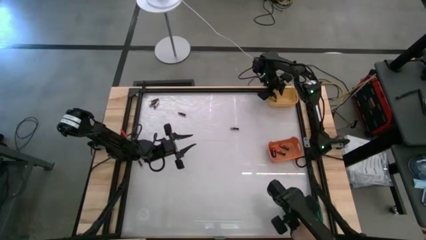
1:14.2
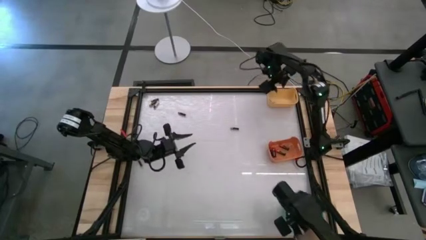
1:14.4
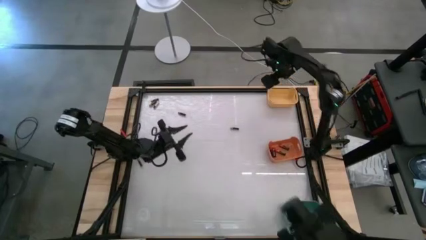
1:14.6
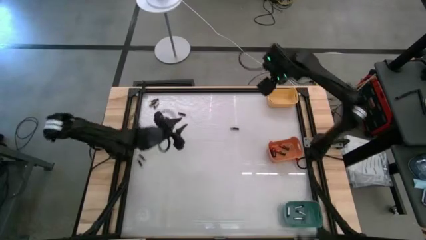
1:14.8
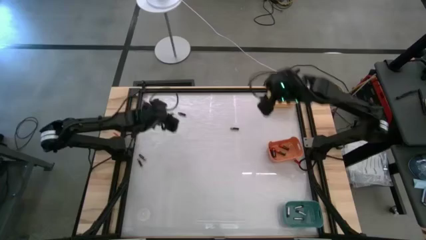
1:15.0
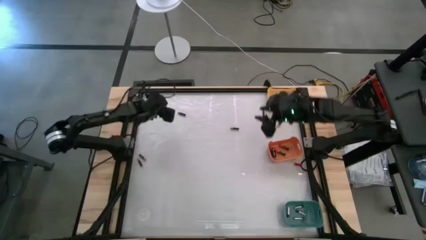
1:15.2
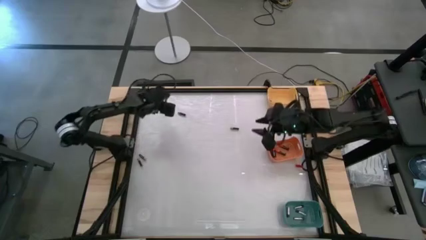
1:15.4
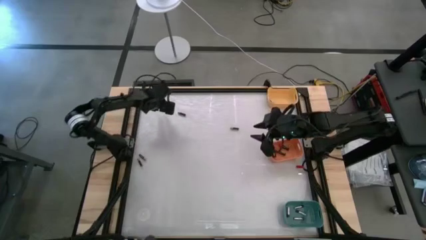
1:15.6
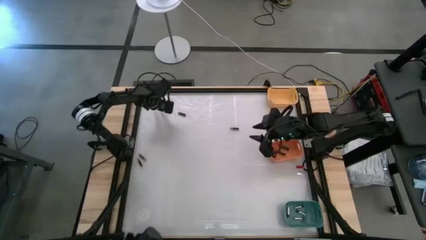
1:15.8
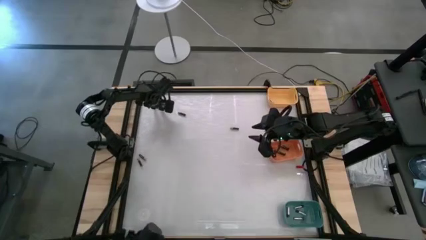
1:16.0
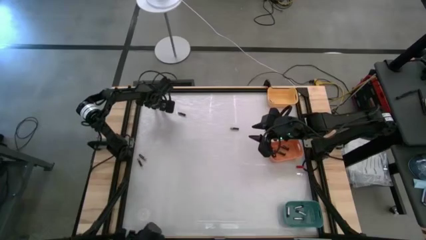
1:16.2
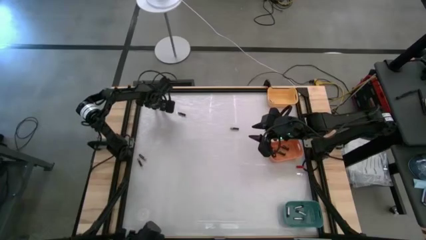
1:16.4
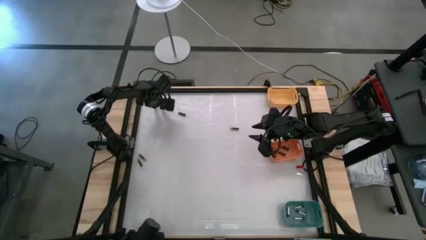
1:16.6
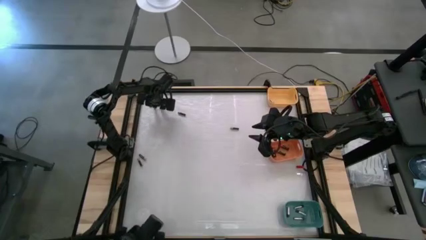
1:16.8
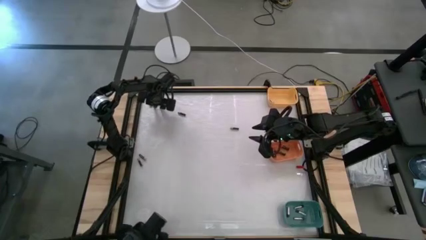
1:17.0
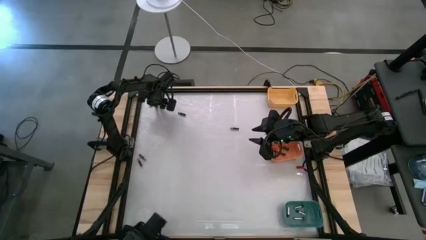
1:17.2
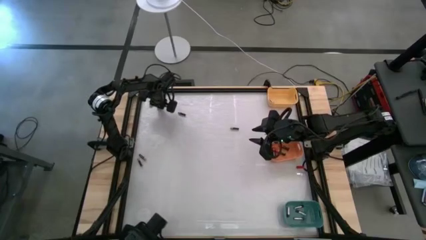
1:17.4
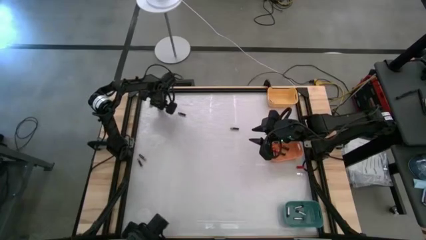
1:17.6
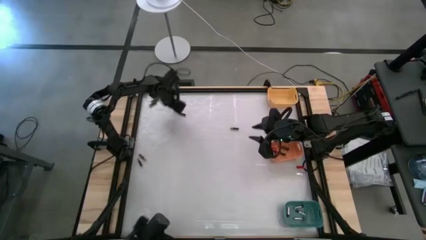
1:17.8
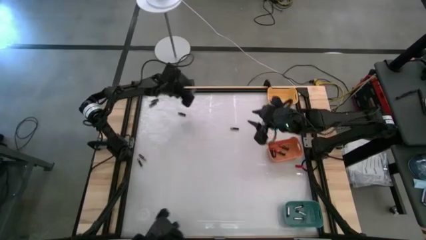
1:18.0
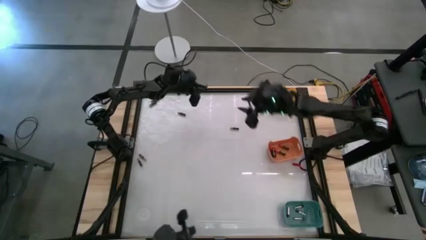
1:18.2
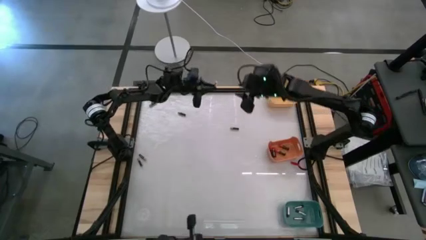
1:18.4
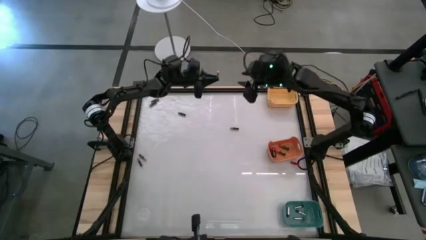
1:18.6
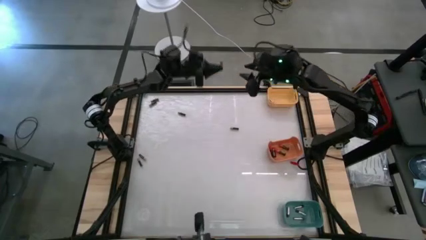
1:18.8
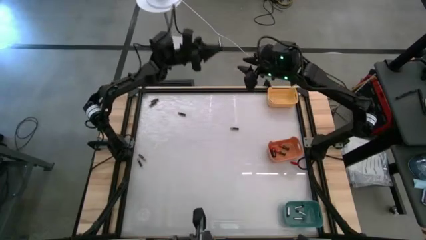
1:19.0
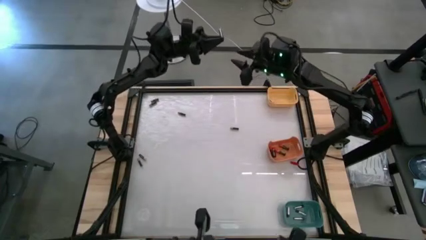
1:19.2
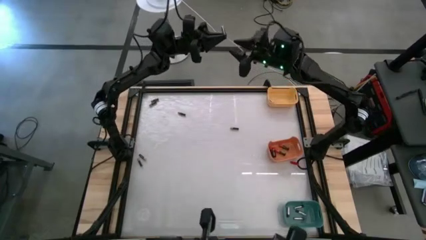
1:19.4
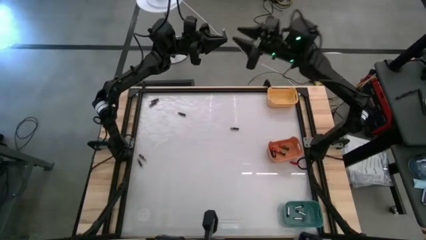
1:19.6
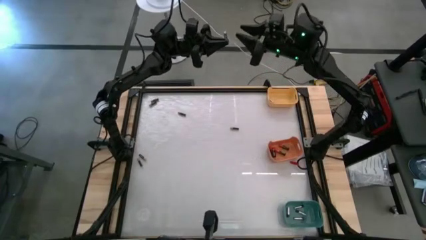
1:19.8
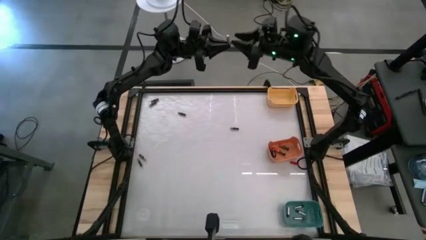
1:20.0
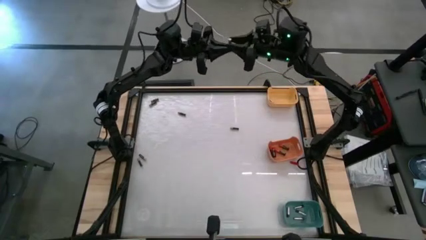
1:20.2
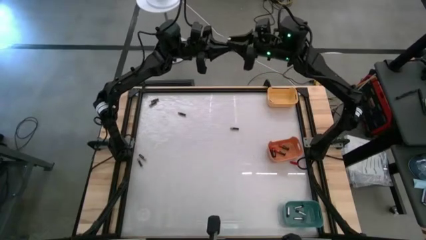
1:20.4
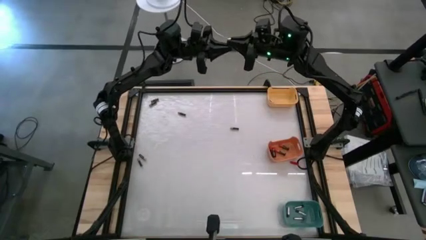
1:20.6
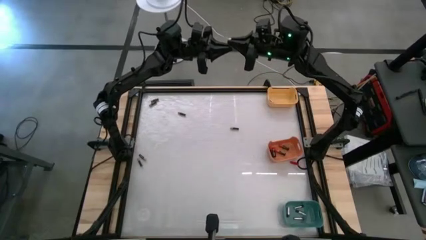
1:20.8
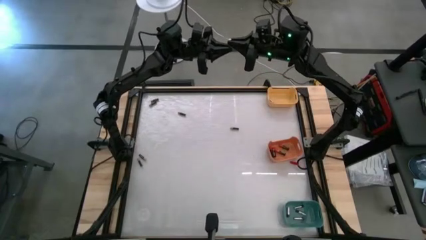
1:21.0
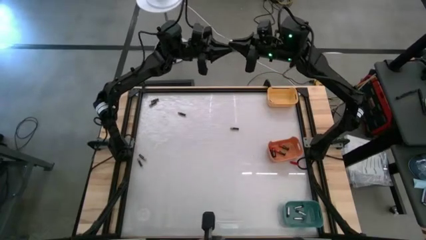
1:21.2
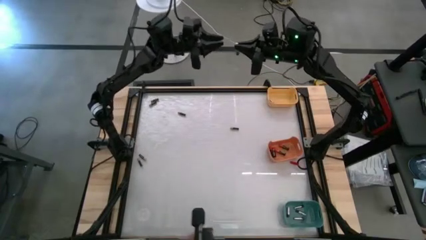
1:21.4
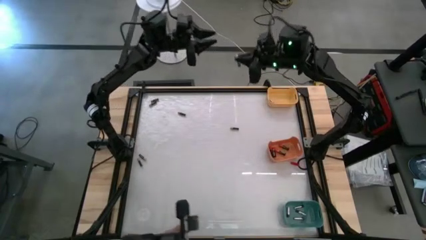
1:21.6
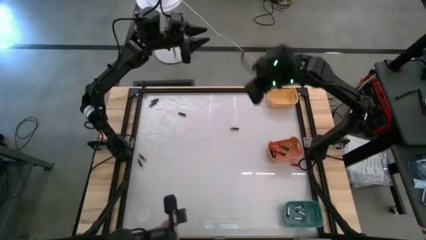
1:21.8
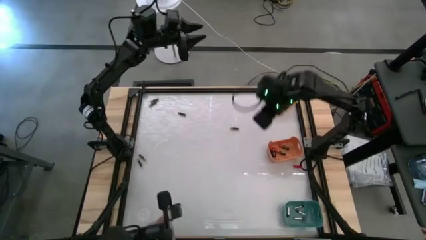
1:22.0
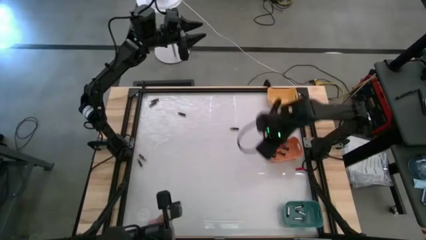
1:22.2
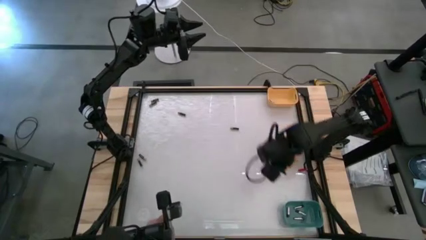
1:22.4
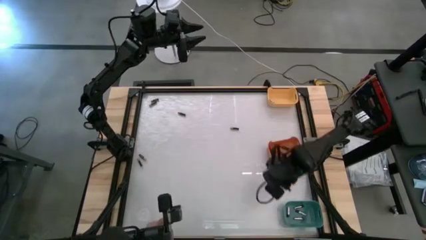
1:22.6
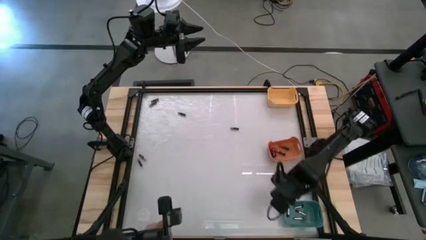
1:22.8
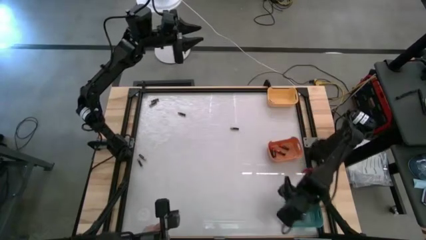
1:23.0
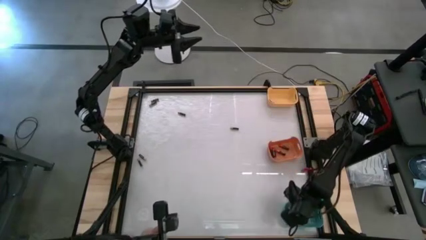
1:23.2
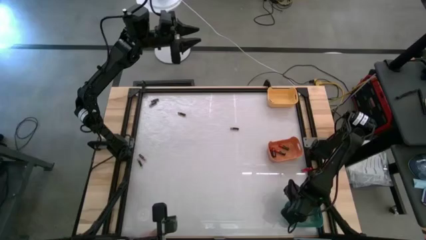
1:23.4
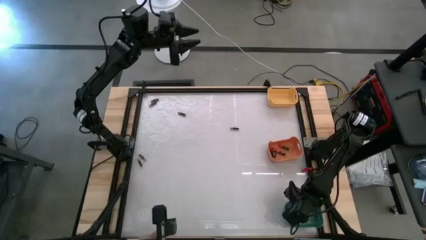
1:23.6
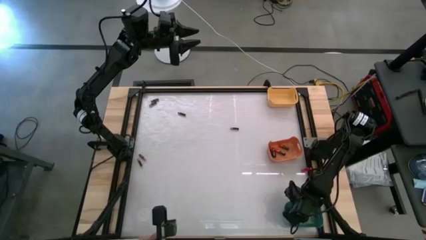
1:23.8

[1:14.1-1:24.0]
Task: Sort batteries
Put the silver battery into the green bin

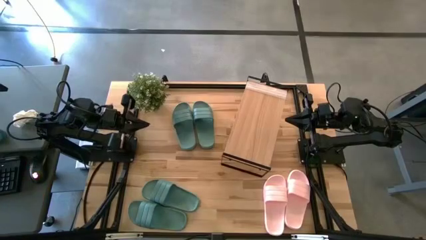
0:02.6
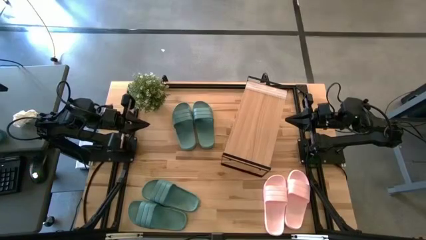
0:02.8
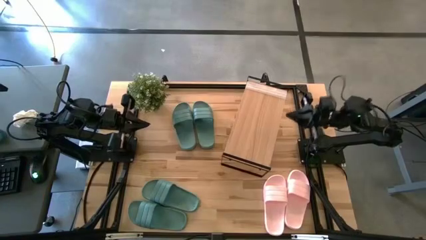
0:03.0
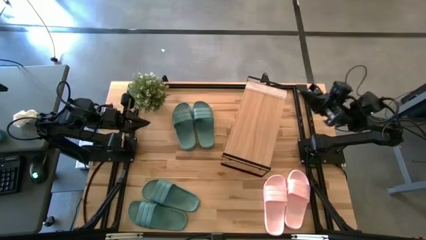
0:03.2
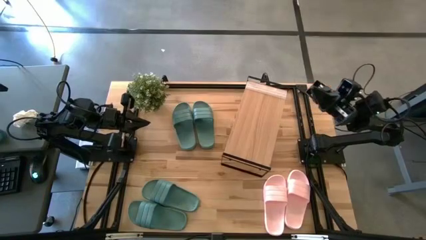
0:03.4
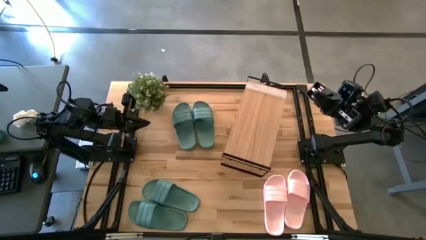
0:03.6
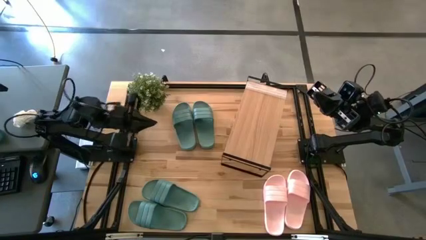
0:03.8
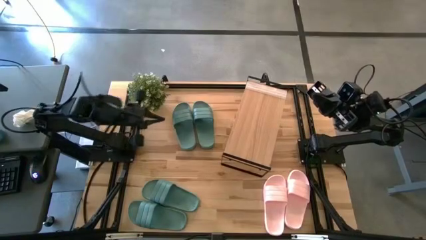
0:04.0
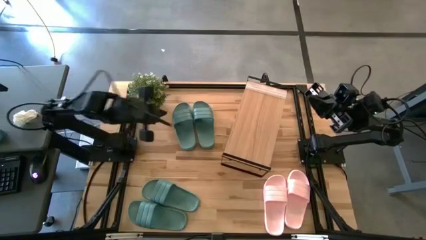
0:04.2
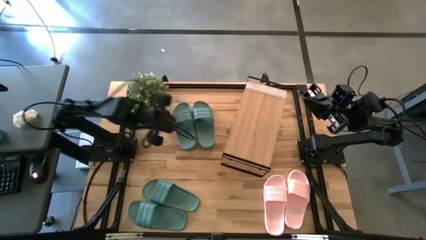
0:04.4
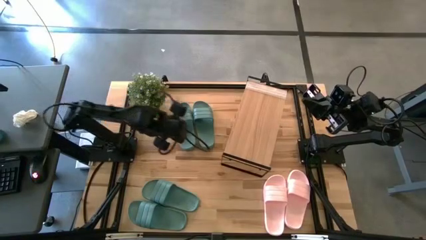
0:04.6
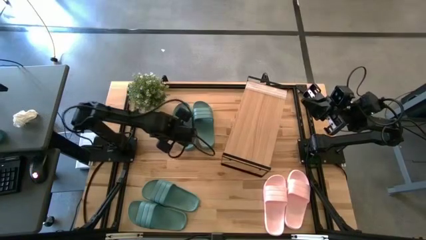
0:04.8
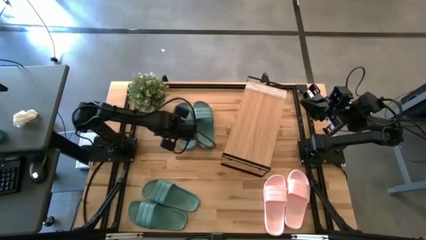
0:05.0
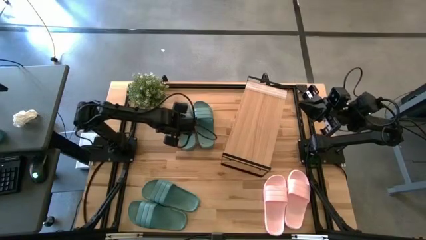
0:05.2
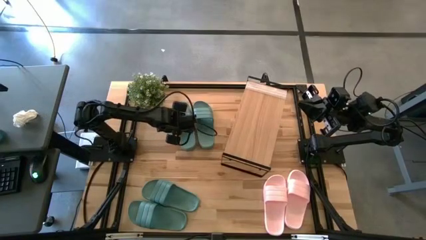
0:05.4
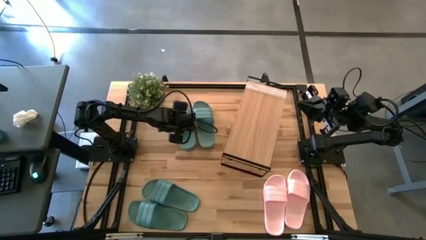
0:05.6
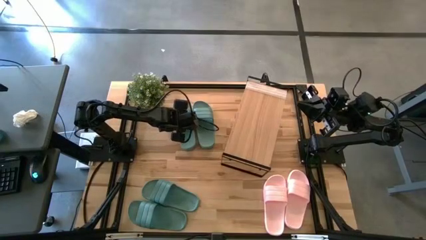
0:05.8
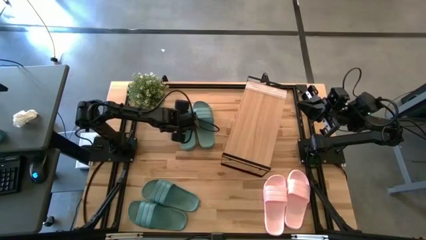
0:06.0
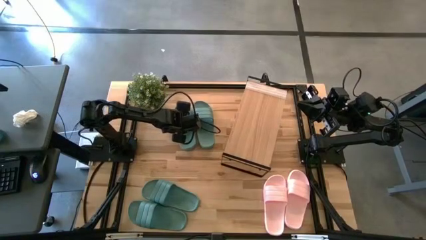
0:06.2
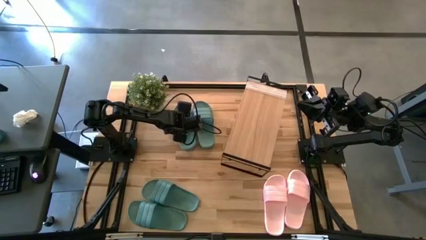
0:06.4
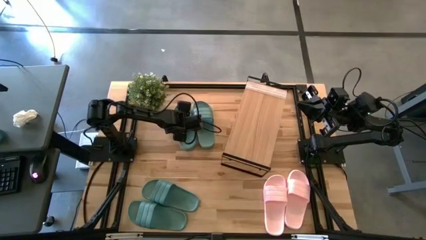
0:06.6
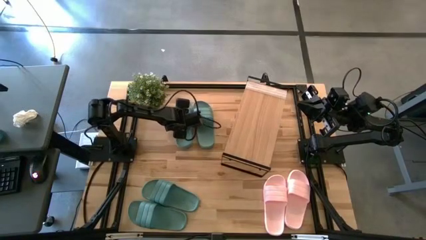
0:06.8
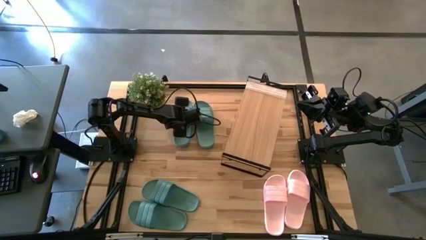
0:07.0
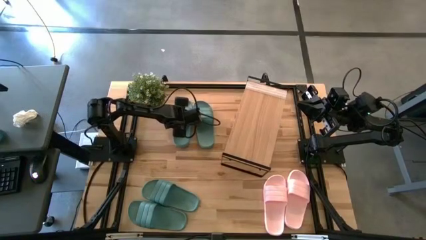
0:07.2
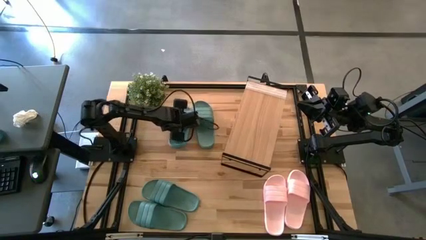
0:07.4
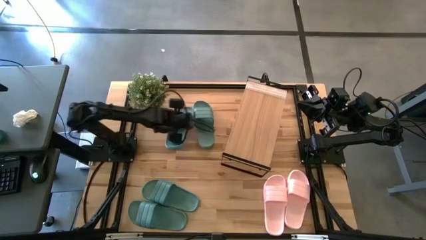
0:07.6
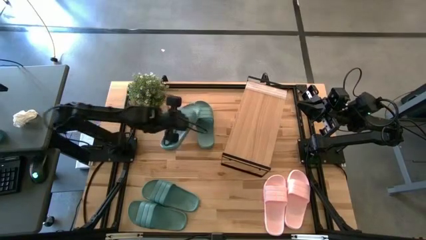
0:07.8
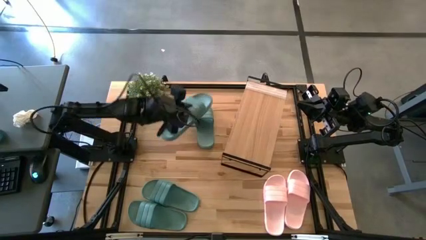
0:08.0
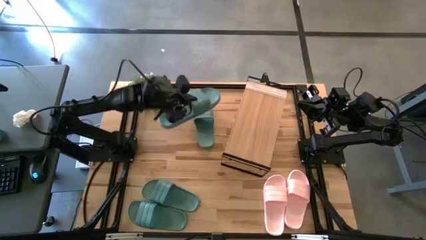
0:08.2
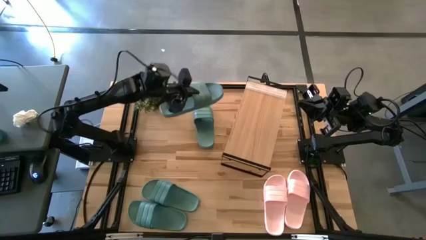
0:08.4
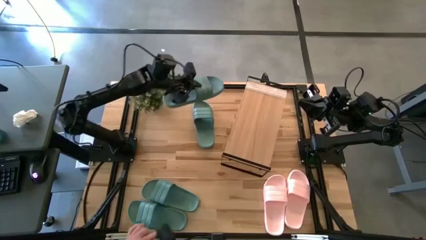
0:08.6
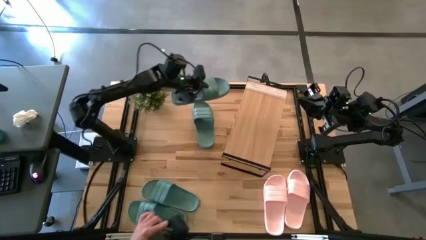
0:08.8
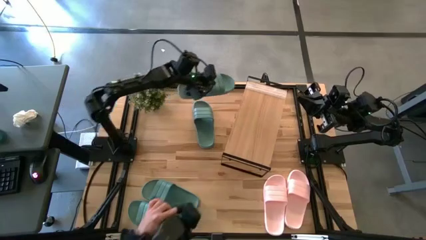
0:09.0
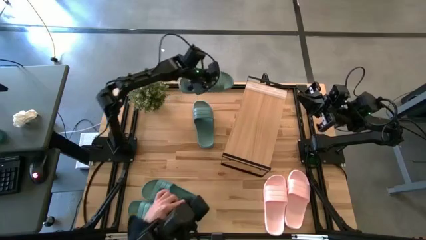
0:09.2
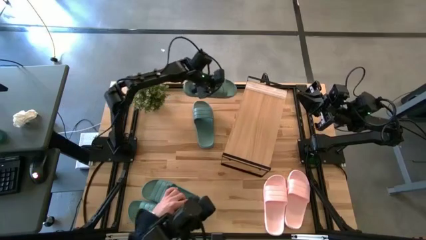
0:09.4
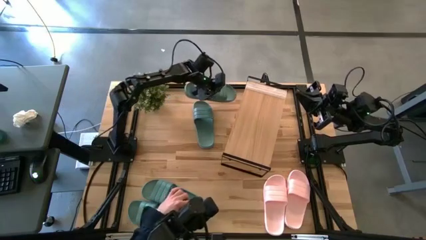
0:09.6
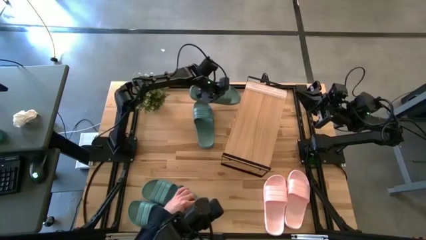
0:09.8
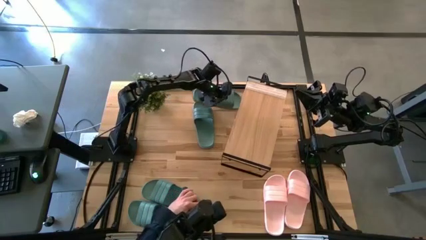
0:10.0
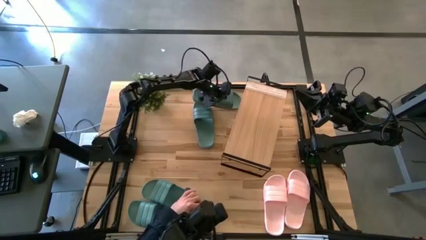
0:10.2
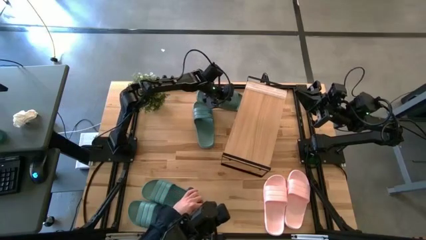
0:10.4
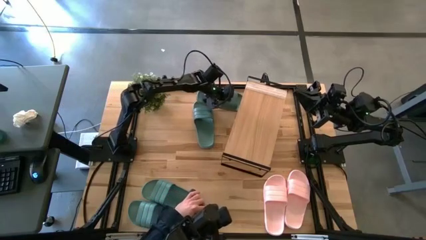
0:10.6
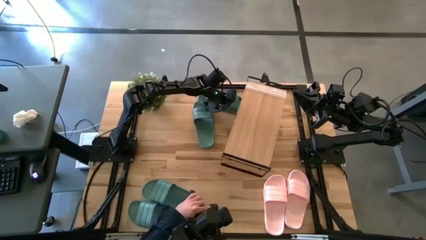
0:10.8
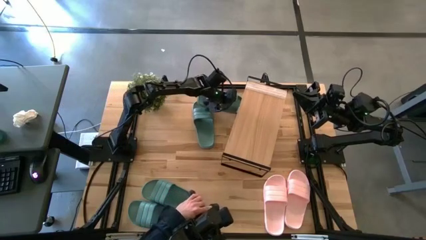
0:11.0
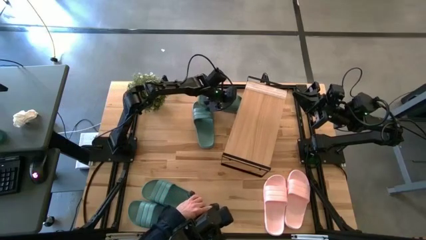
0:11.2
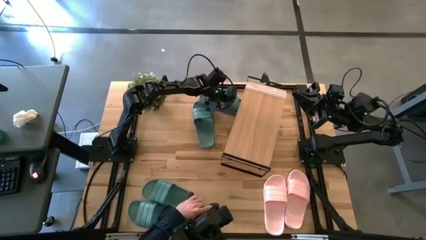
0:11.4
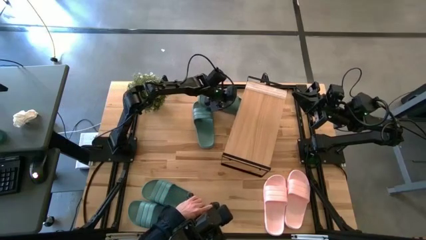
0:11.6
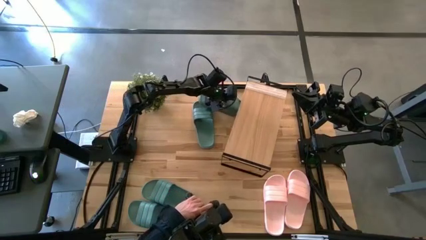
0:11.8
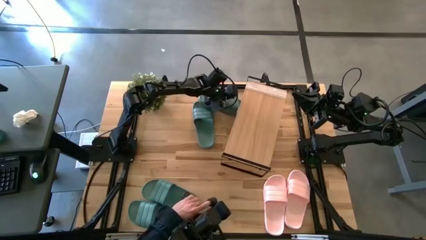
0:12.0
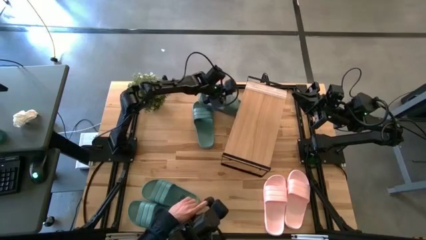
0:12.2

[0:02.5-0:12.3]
Task: Pick and place slides into the shelf
Put the green slide under the shelf
